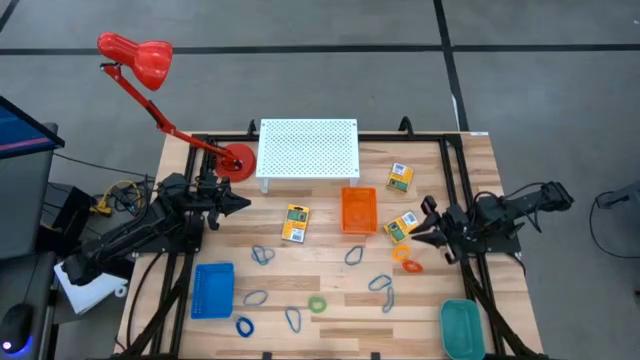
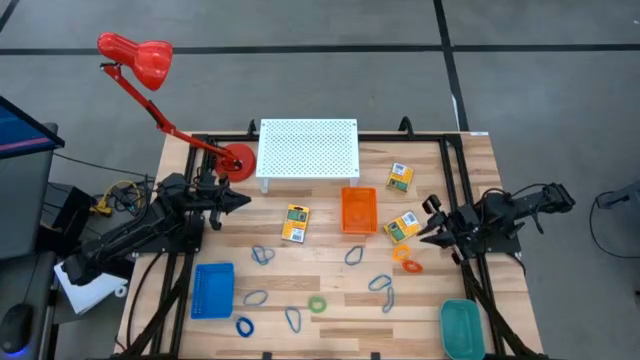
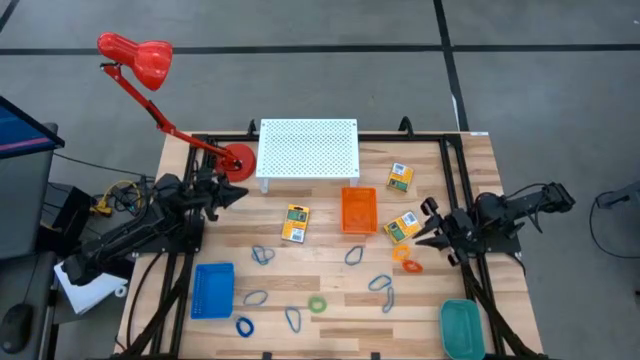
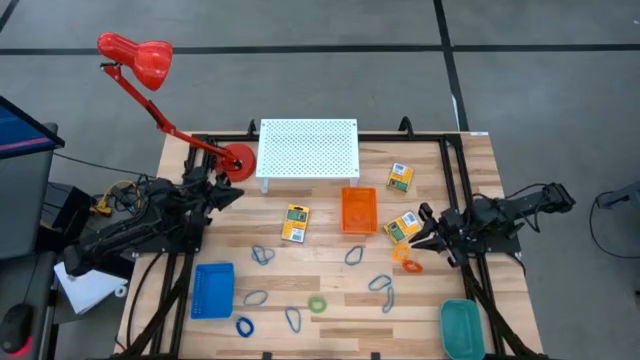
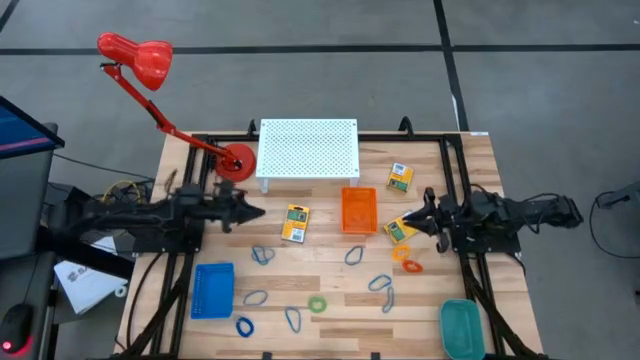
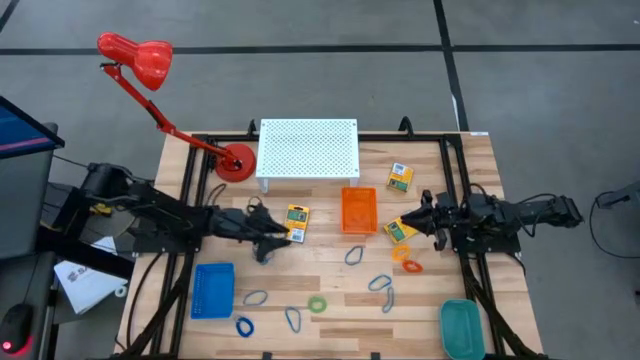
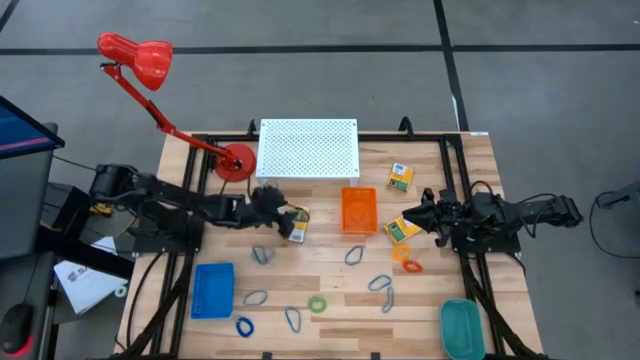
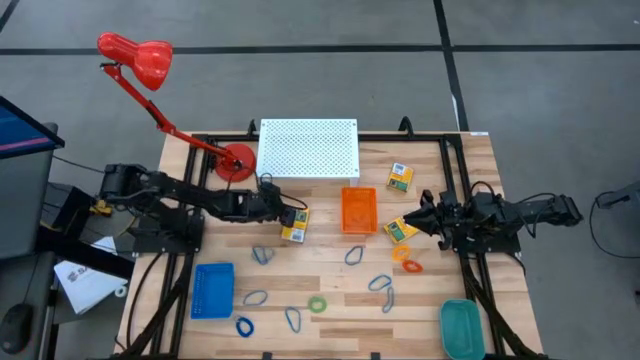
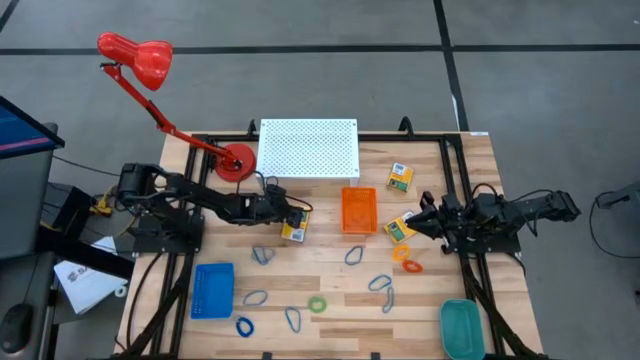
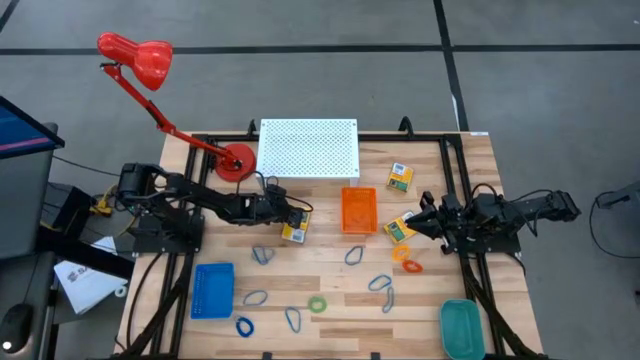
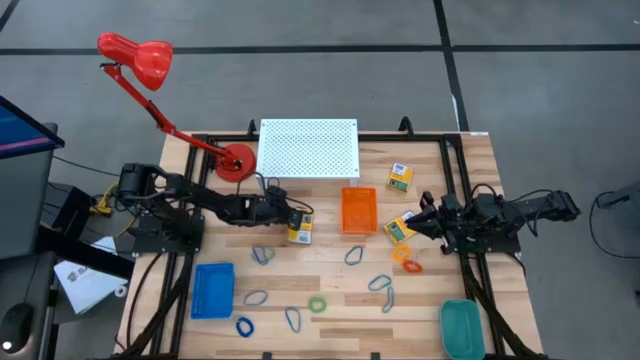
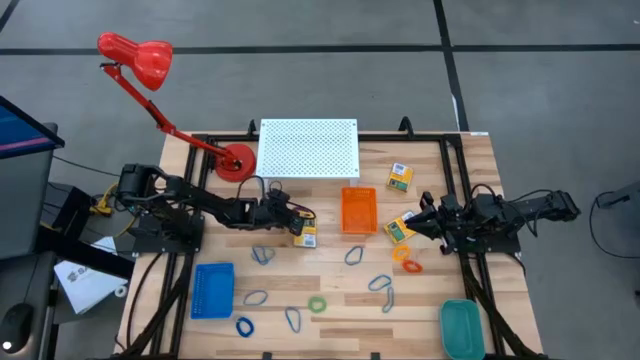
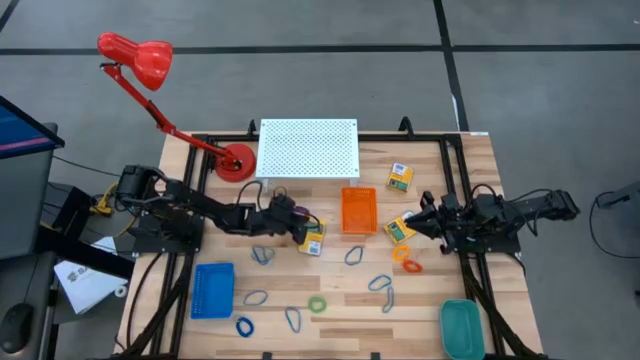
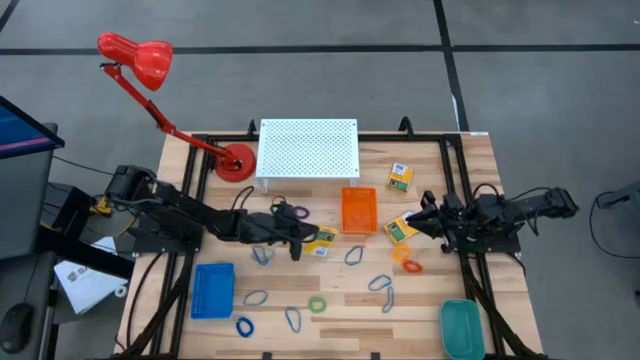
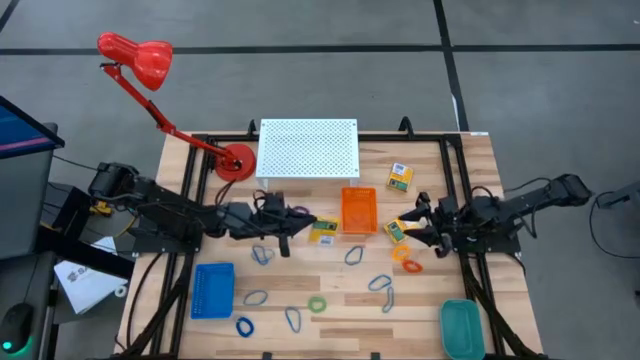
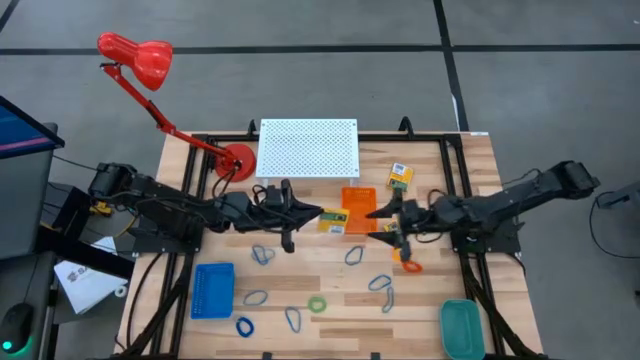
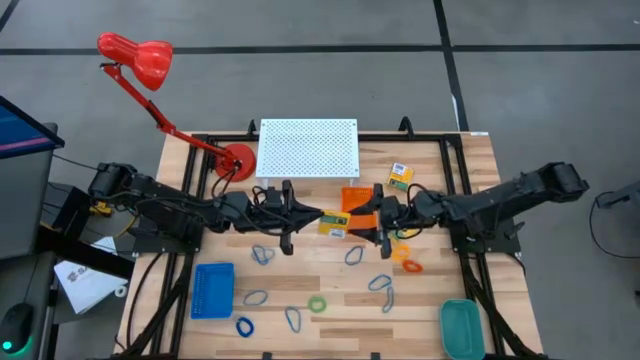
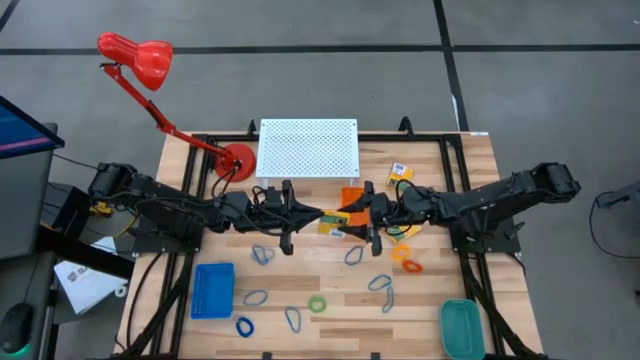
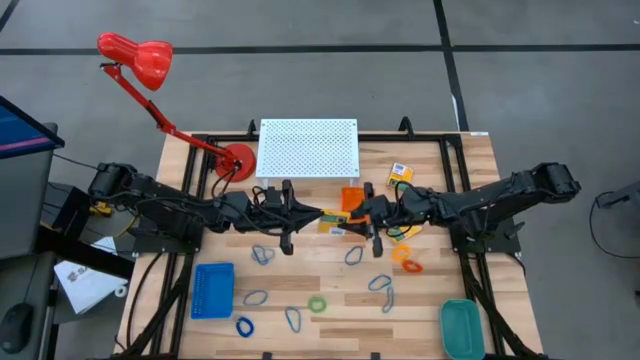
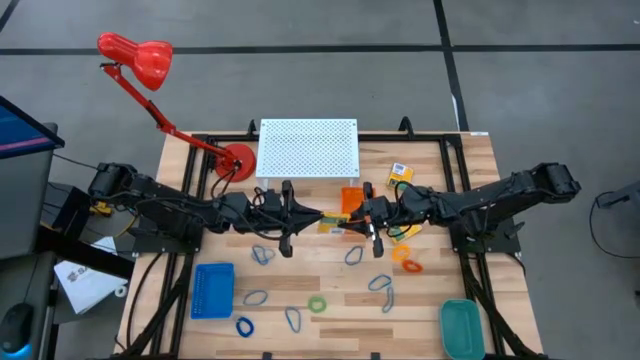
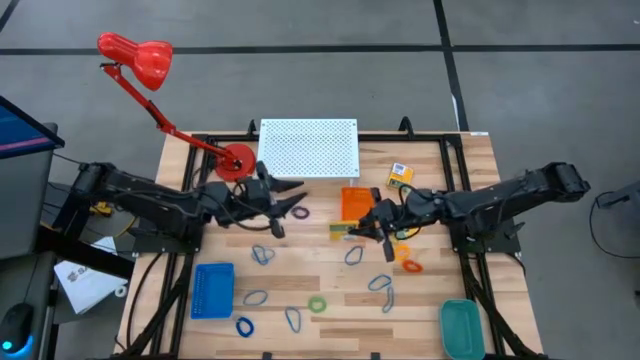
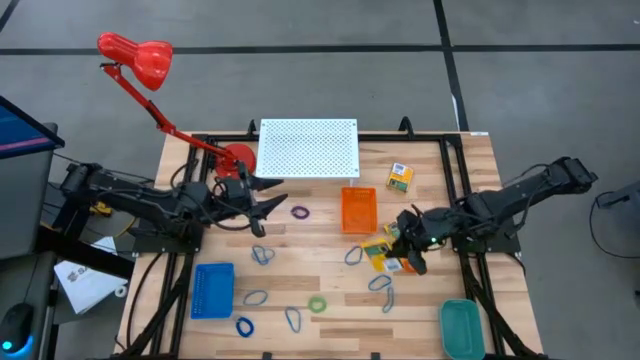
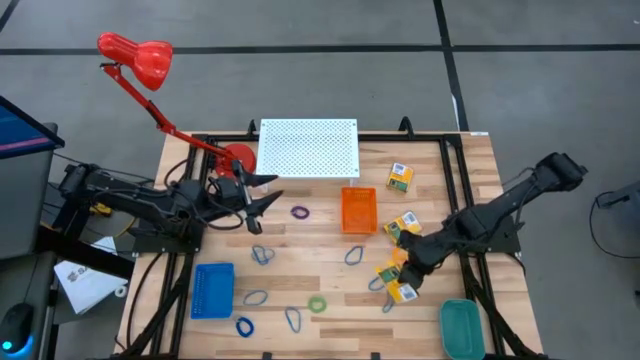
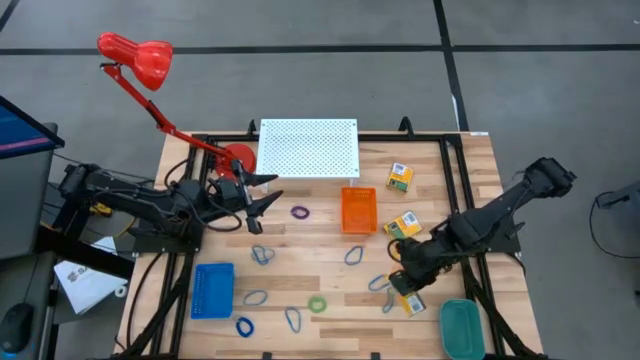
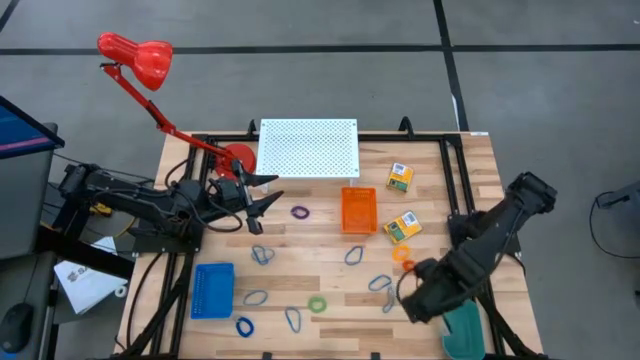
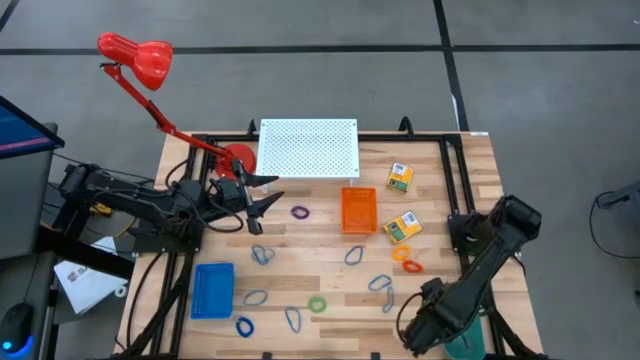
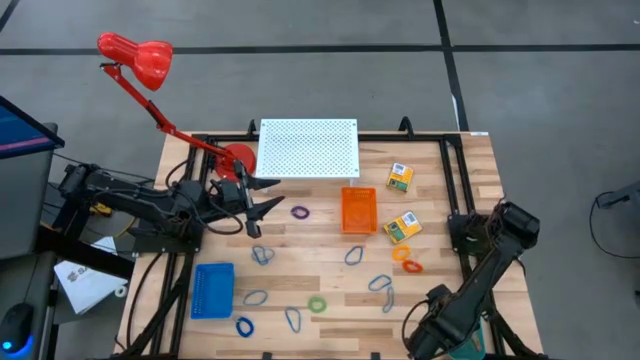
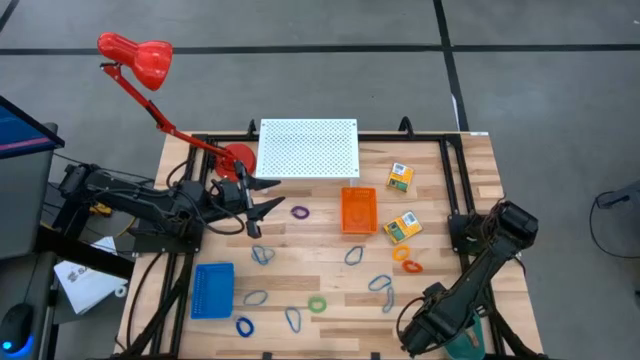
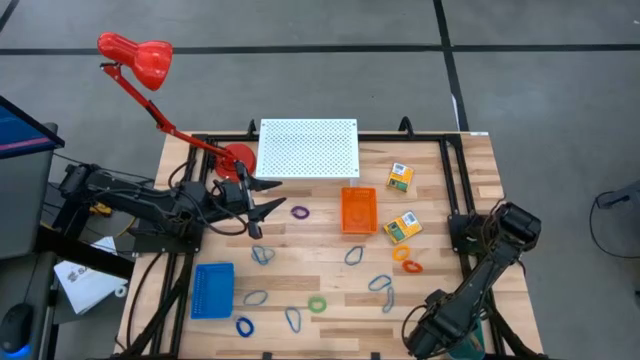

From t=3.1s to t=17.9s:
Task: Pick & Place Office Desk Supplies
Put the left yellow crayon box into the blue bin

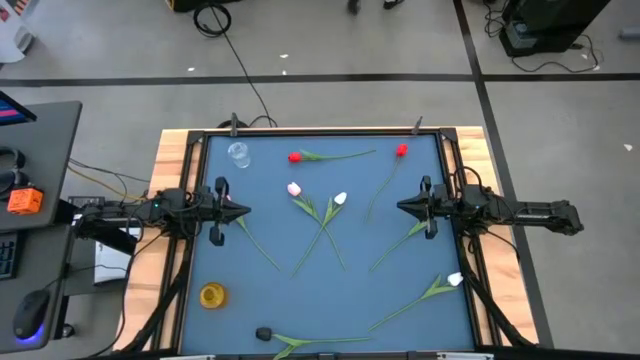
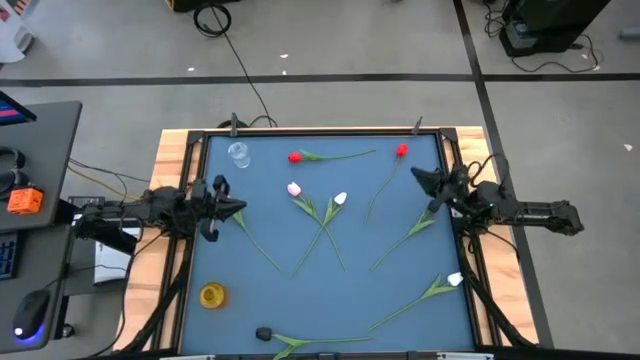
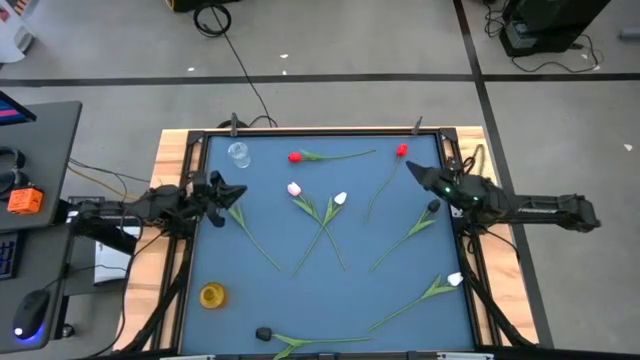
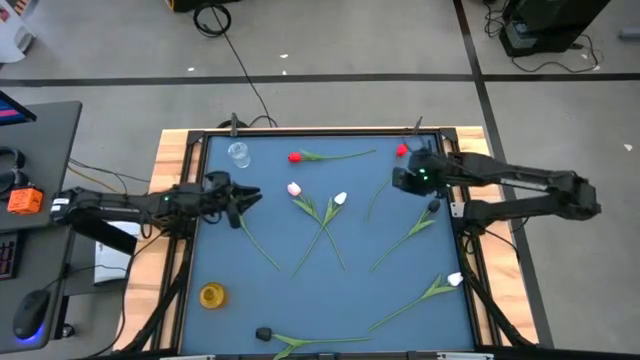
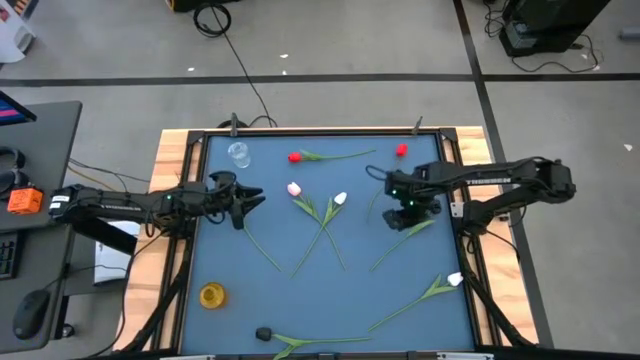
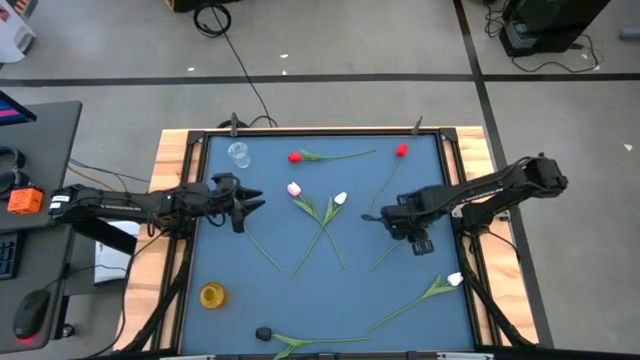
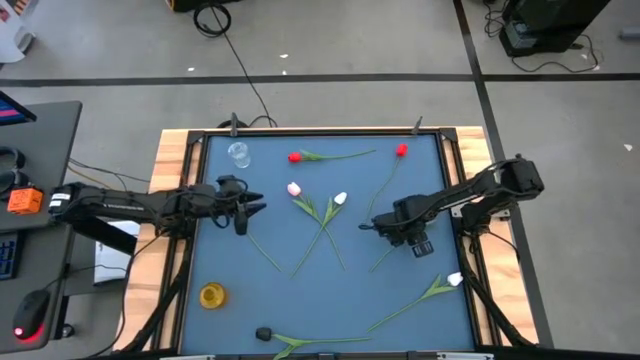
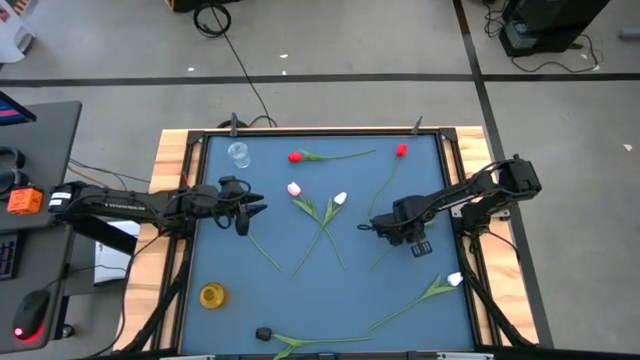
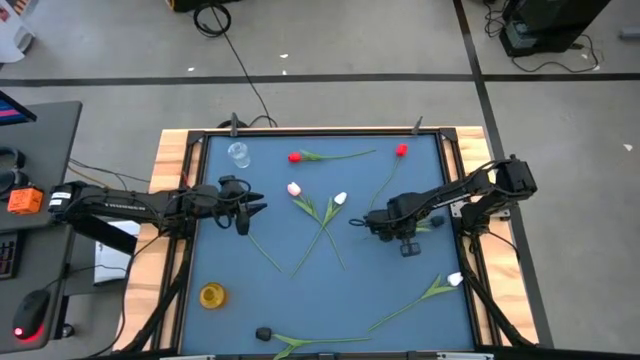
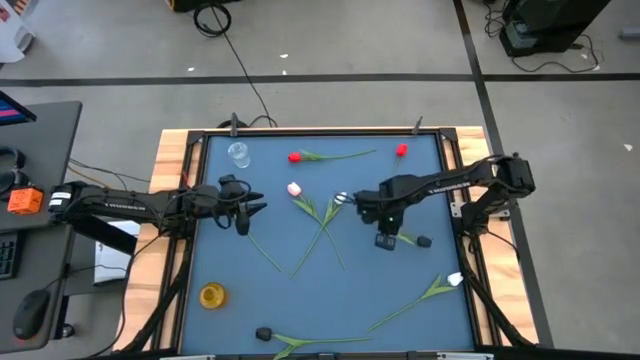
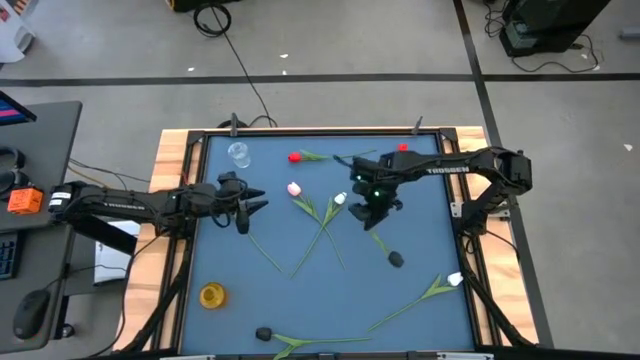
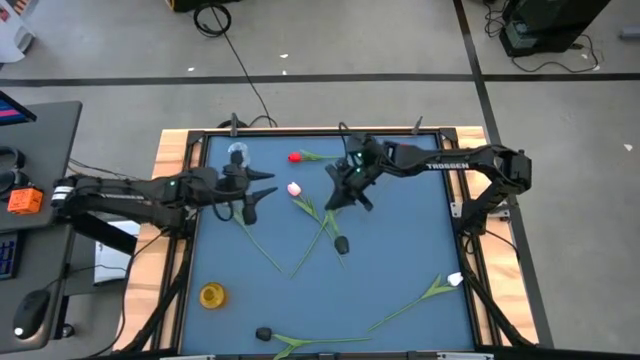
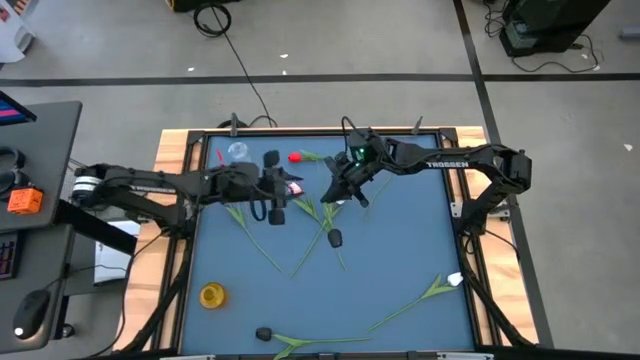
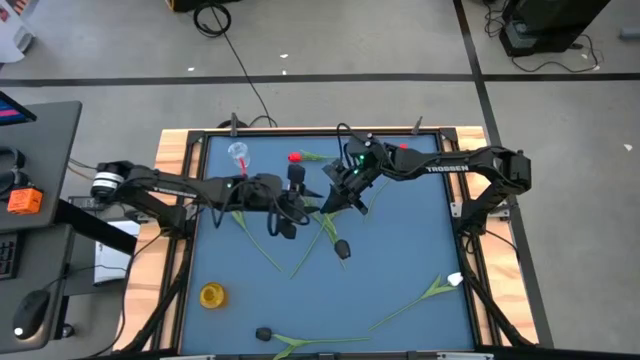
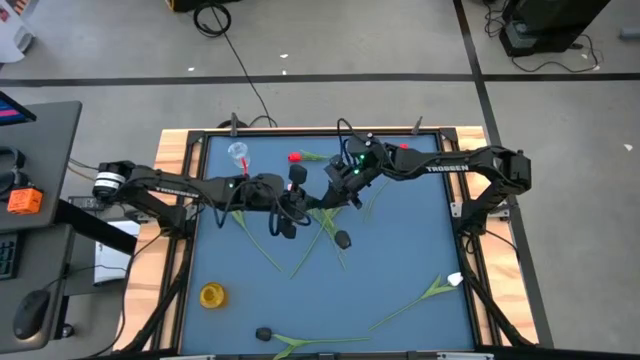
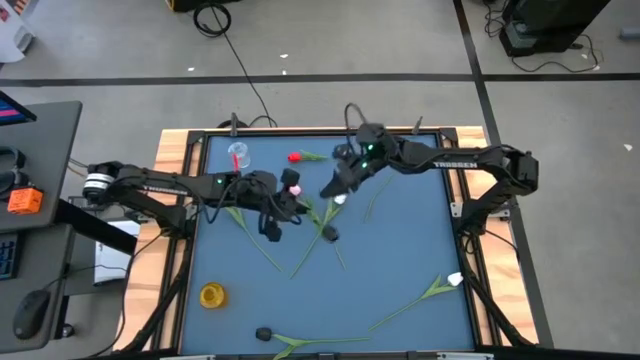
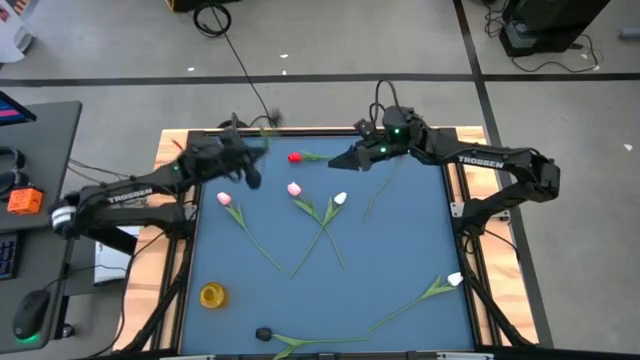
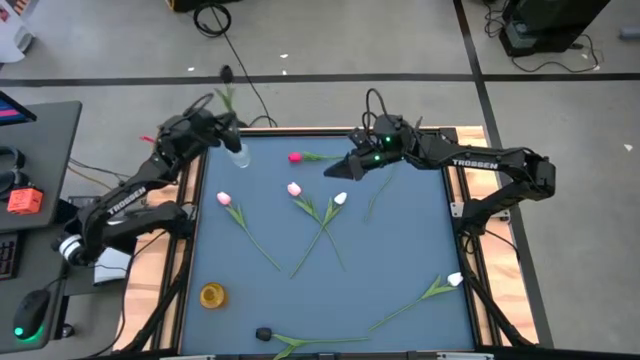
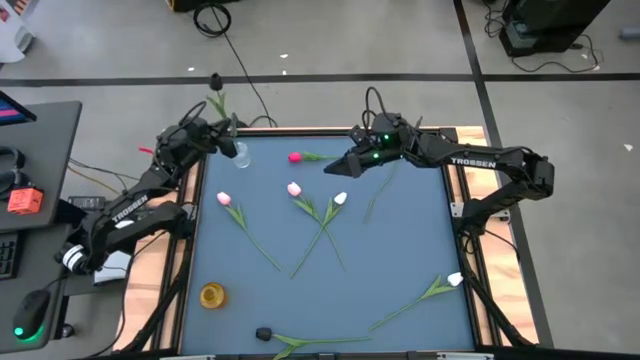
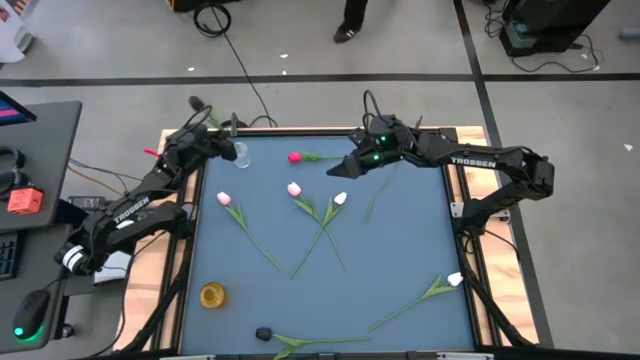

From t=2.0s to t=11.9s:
Task: Sort flowers into vase by color
Put the top black tulip into the transparent vase
